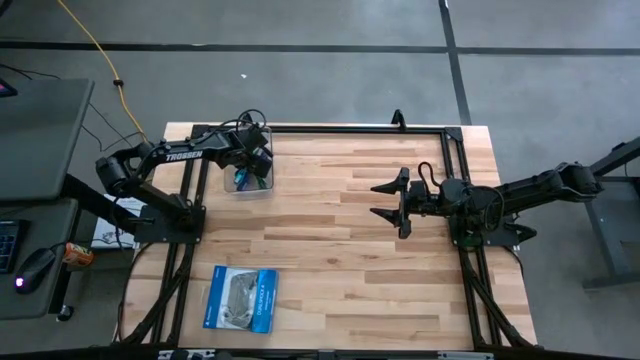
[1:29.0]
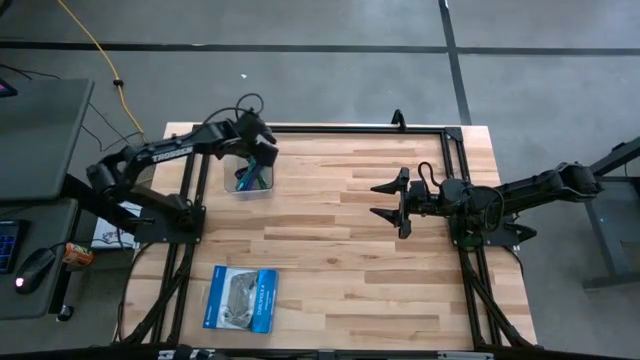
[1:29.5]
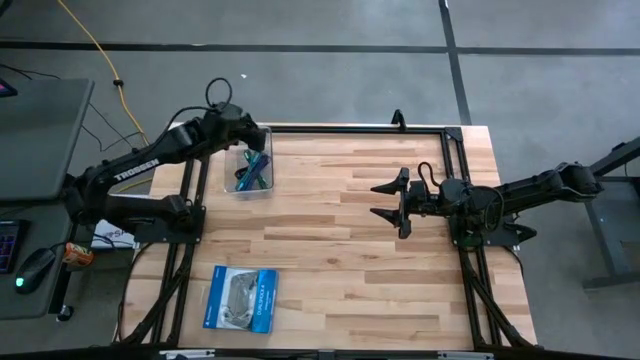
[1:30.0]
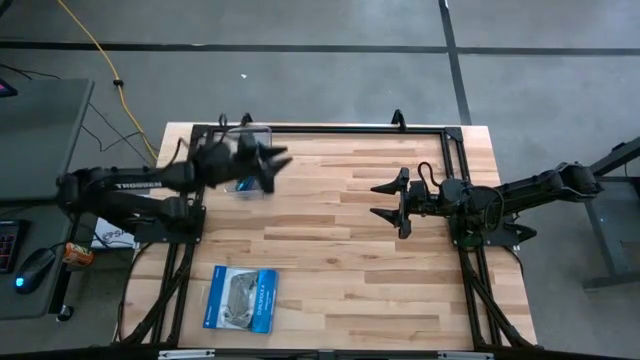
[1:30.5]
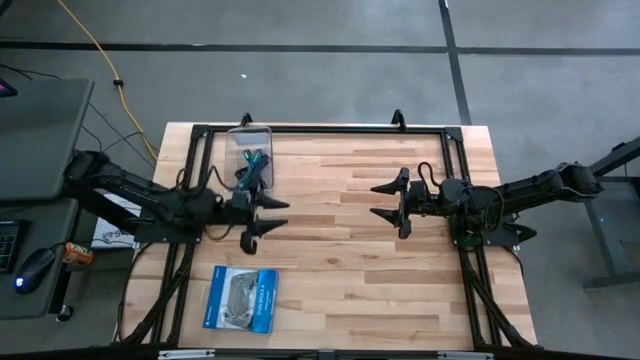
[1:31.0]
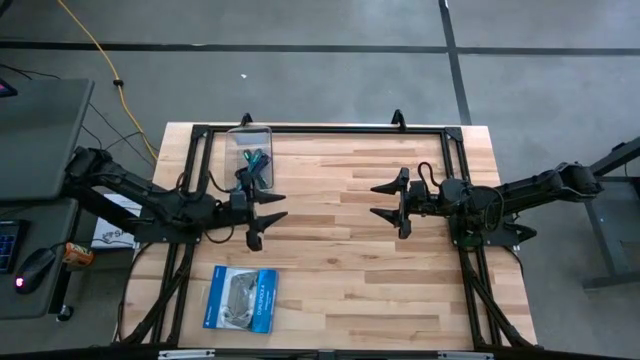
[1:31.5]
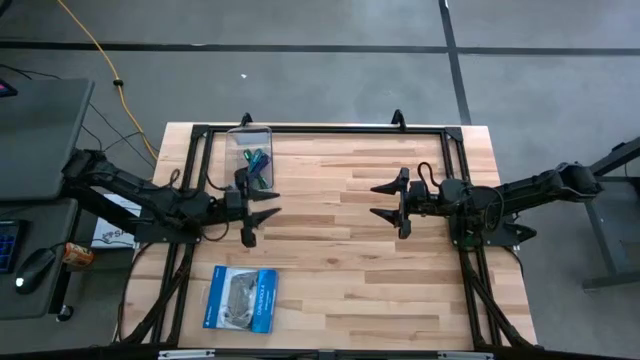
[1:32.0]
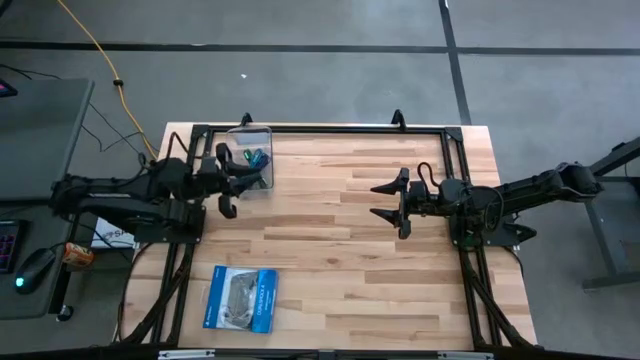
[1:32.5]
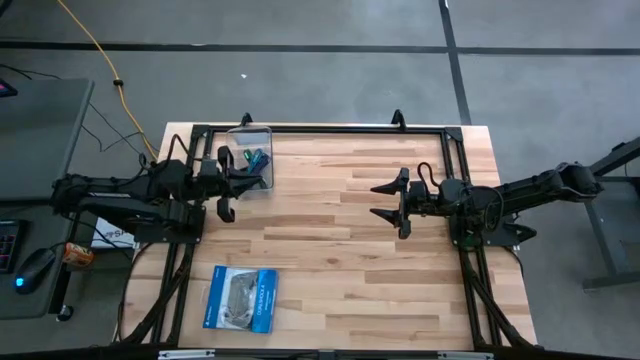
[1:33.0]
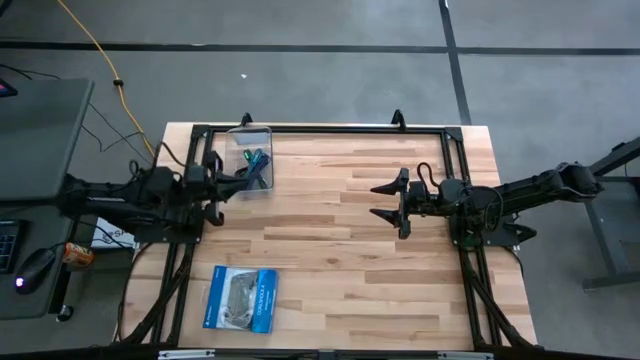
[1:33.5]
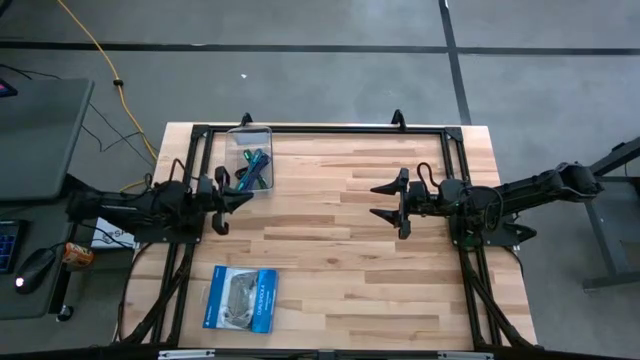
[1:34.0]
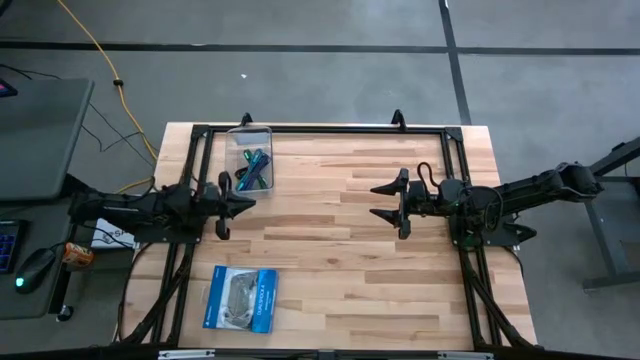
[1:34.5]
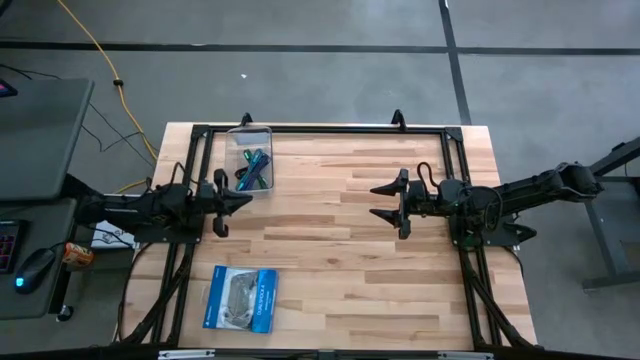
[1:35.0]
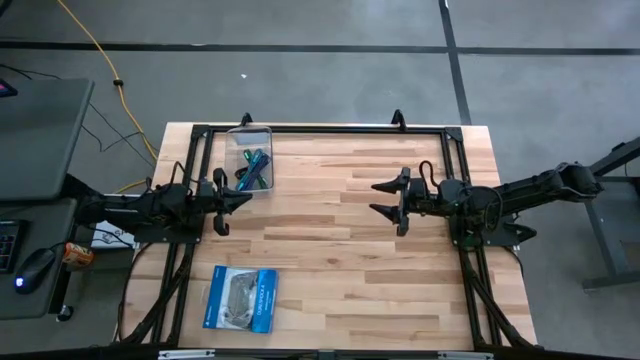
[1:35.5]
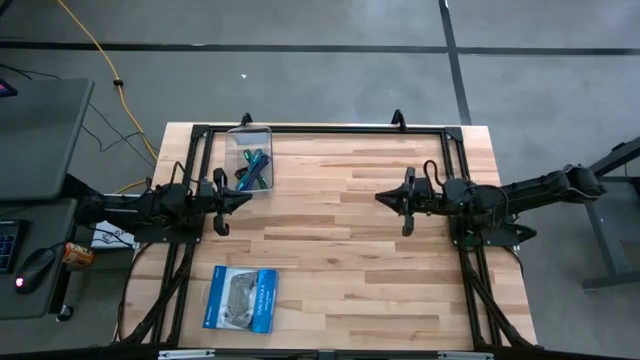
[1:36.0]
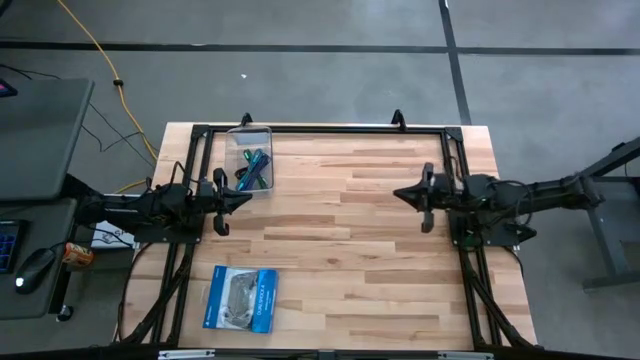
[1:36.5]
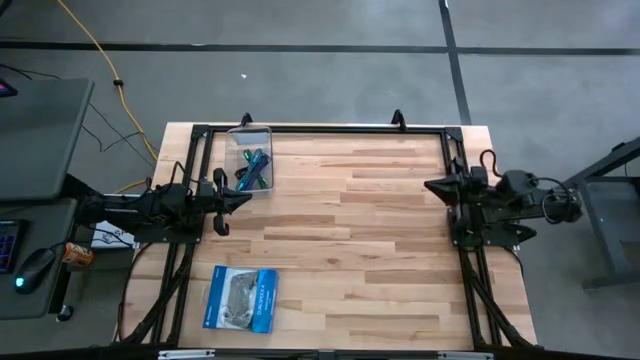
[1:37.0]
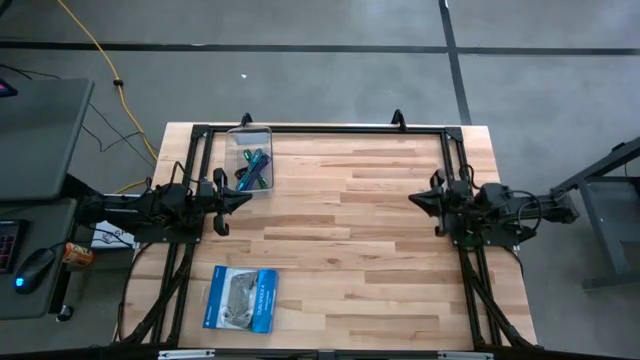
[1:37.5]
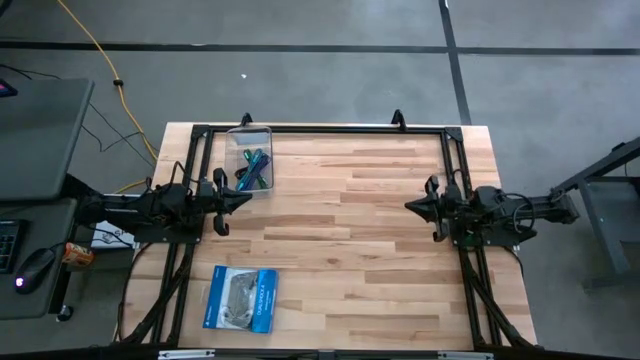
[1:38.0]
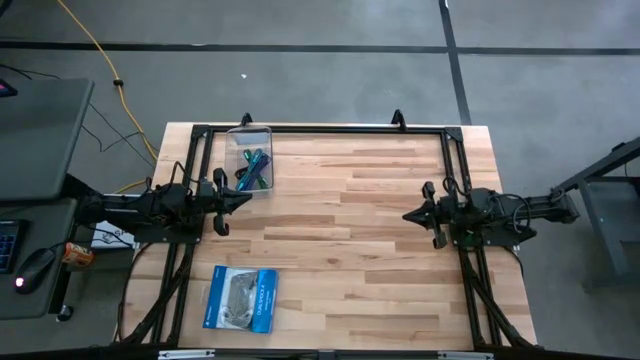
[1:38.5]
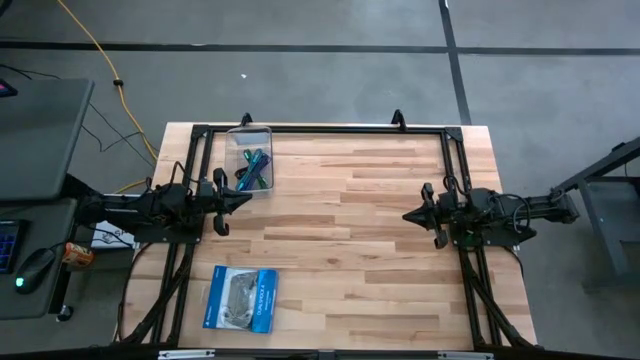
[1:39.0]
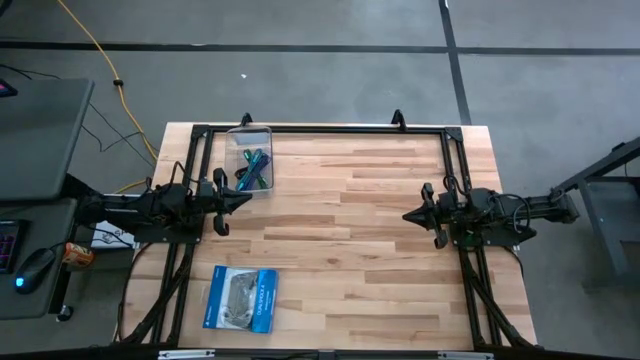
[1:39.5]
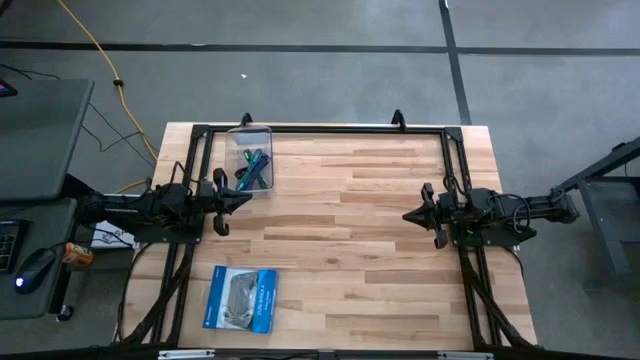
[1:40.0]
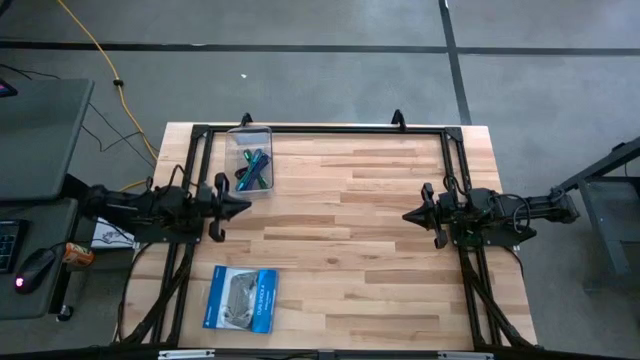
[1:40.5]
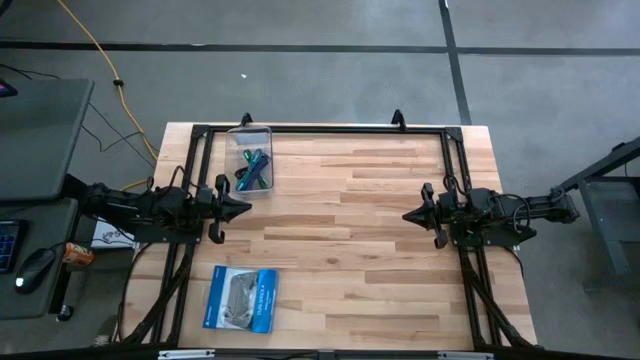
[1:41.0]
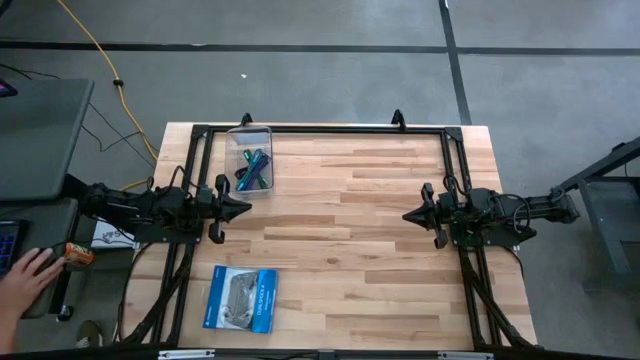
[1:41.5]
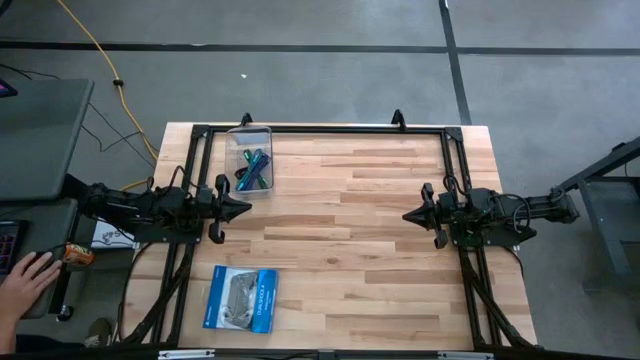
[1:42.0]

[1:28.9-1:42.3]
Task: Pick and place USB-C Cables
Return to Home Position

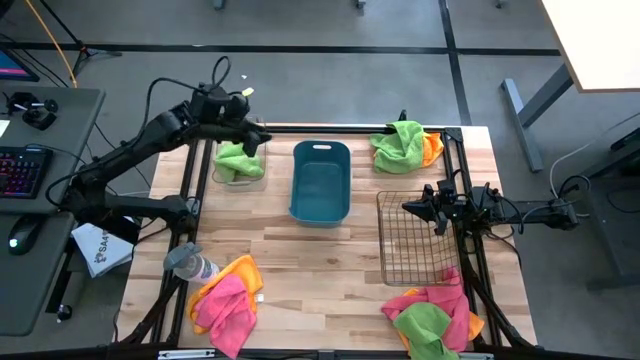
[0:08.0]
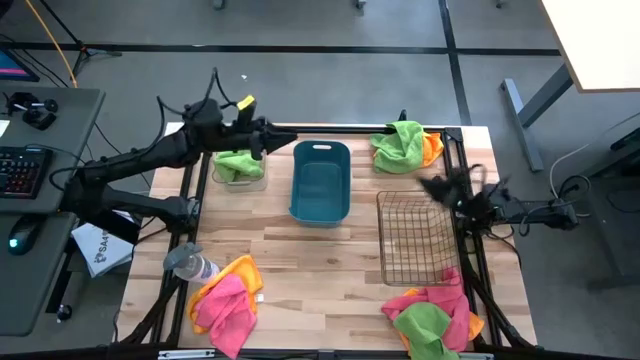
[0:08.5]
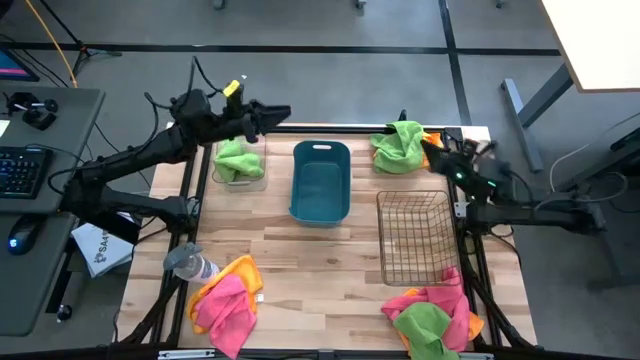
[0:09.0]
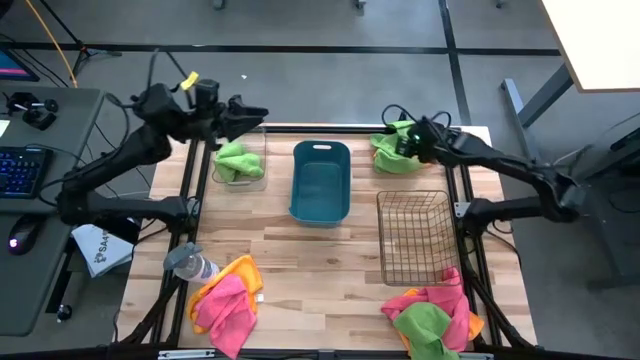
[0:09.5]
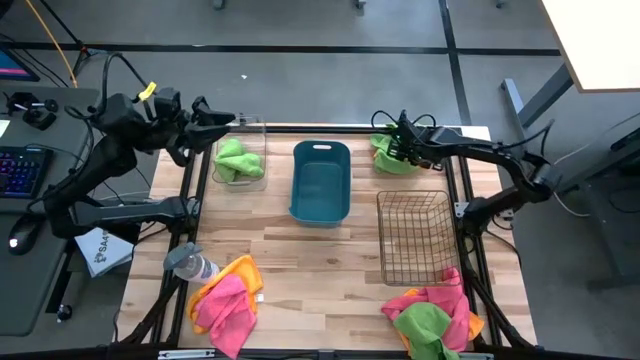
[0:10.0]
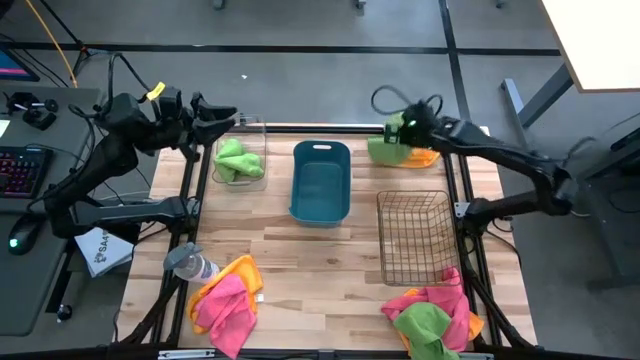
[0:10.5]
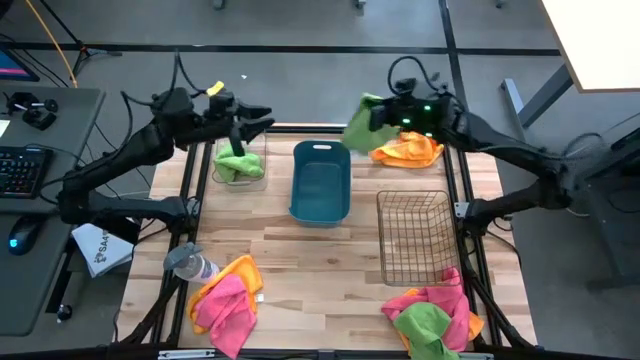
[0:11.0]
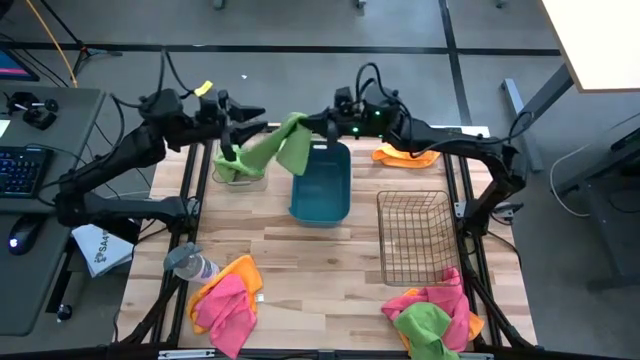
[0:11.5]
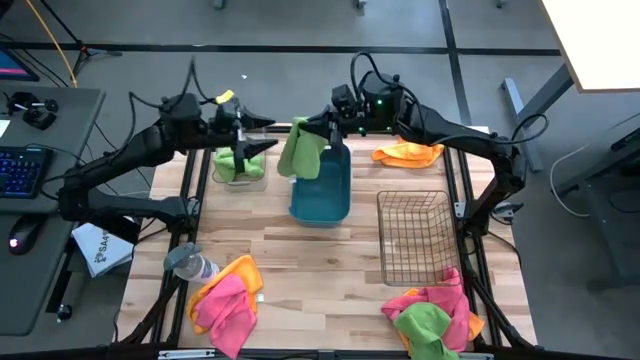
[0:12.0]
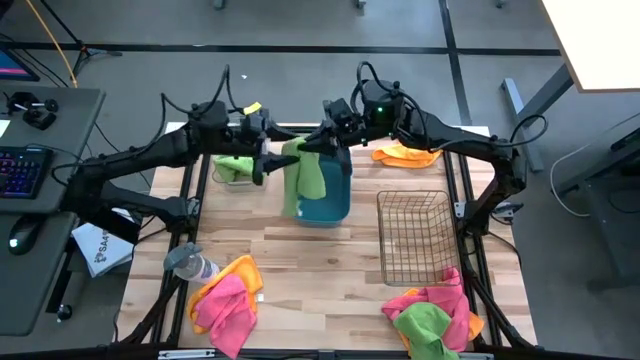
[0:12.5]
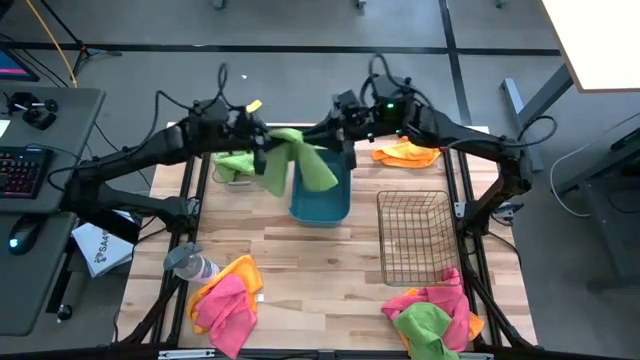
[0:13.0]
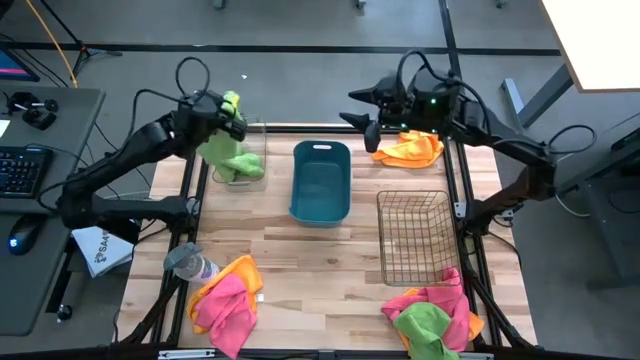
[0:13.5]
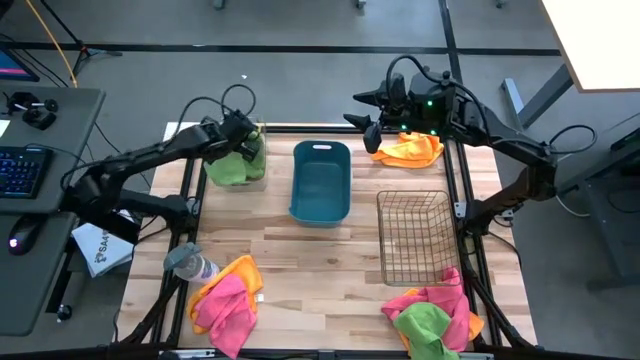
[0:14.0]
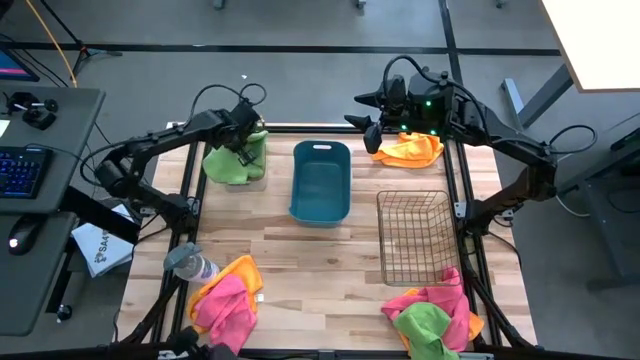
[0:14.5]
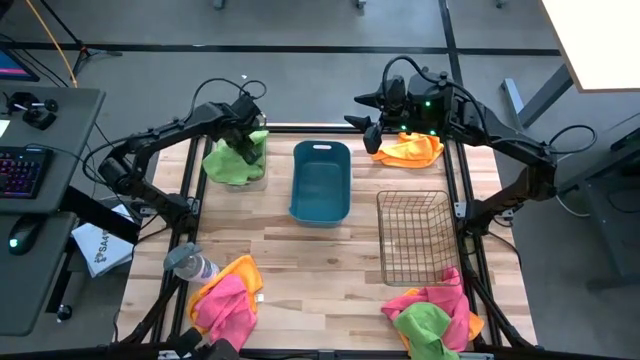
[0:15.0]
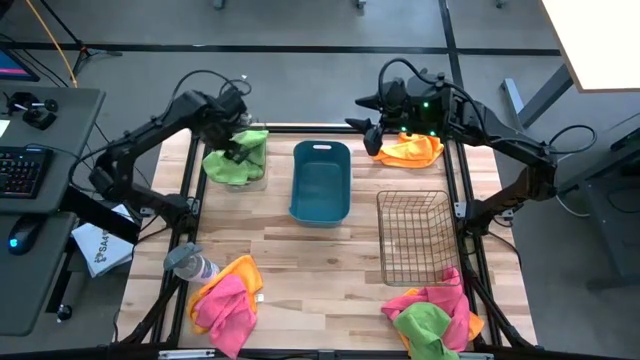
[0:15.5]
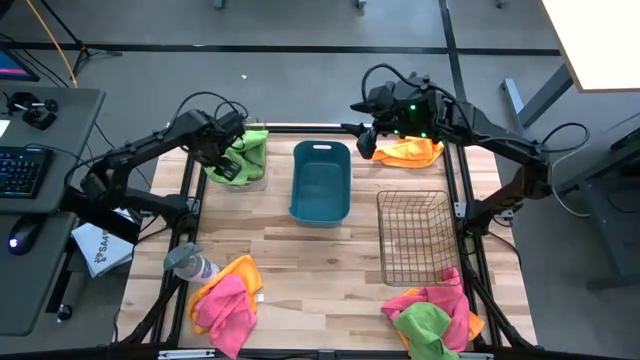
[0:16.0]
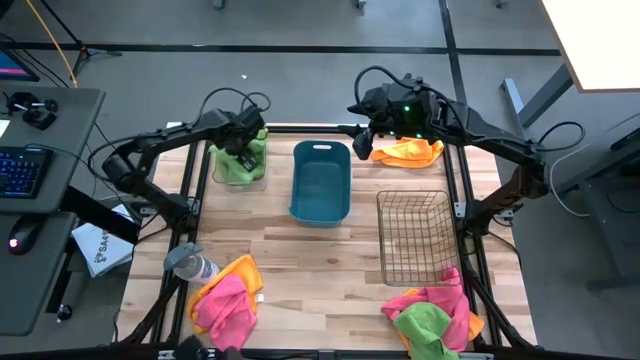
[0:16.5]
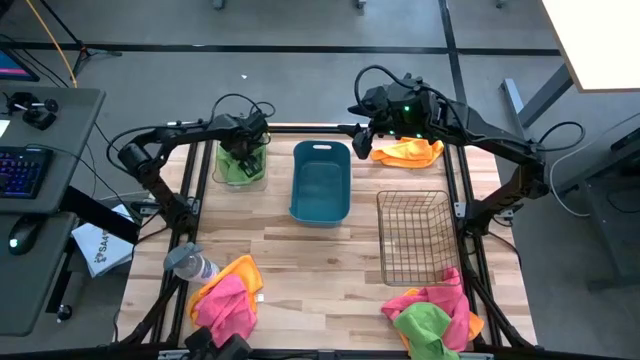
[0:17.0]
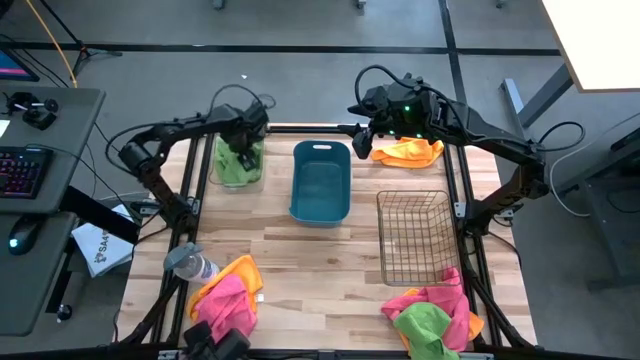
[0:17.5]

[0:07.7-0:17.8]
Task: Sort microfiber towel by color & place in baskets
Put the top green towel into the transparent bin
